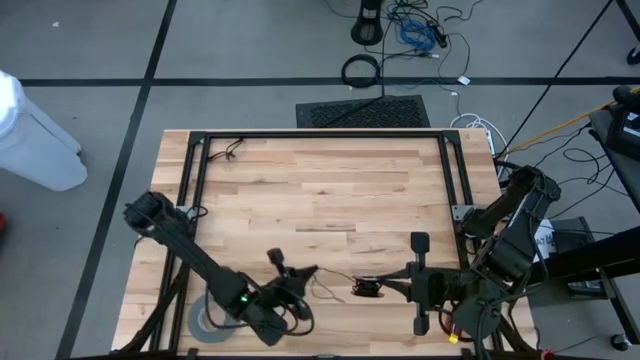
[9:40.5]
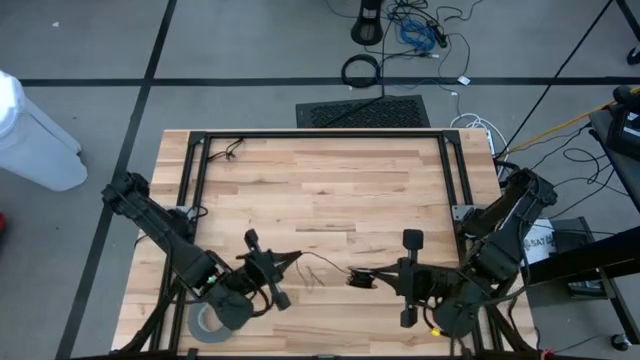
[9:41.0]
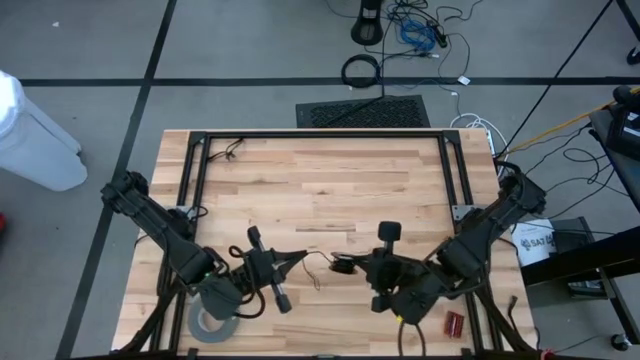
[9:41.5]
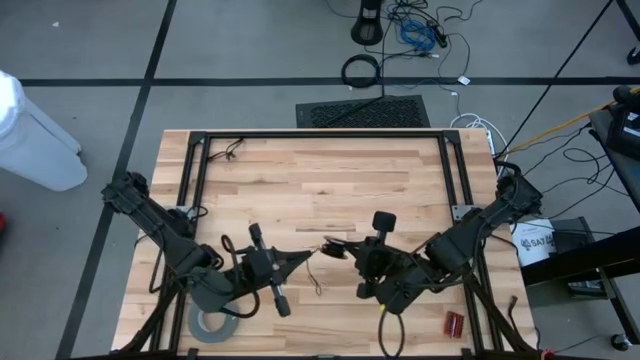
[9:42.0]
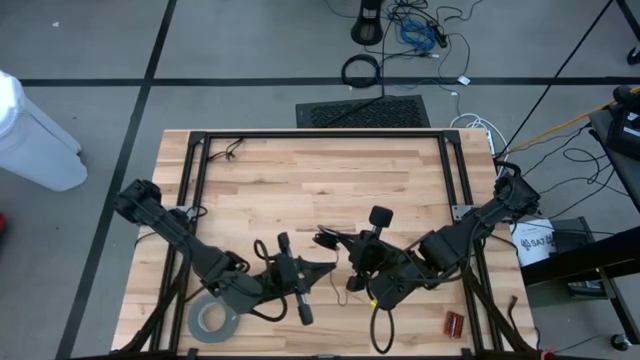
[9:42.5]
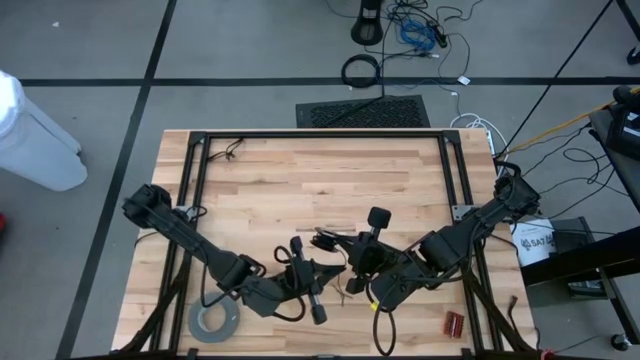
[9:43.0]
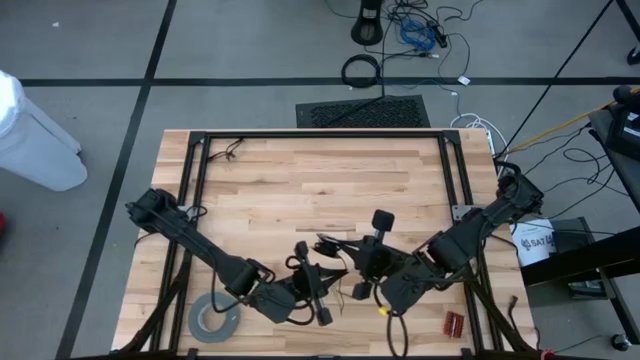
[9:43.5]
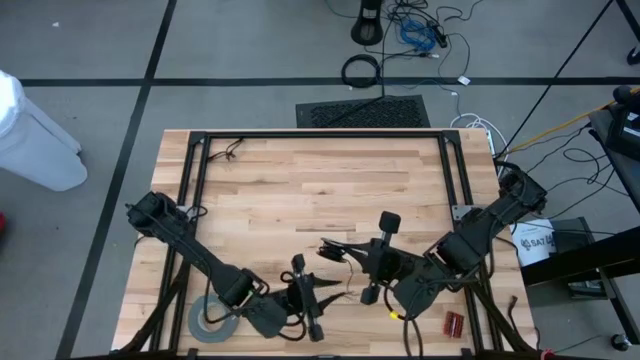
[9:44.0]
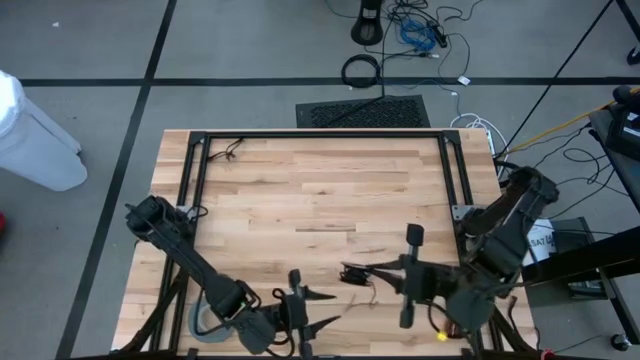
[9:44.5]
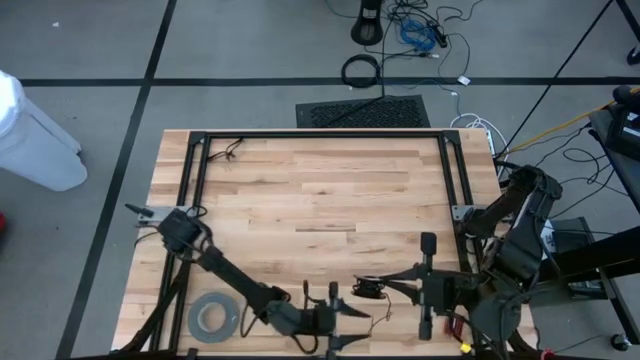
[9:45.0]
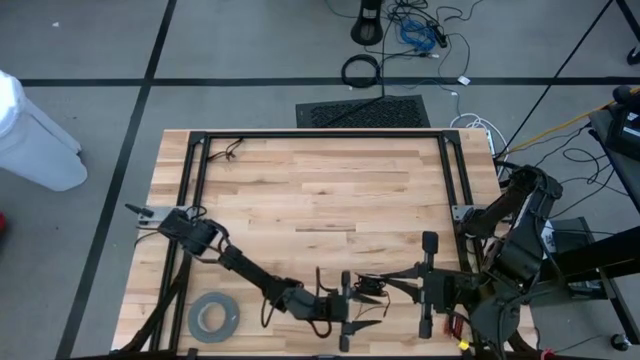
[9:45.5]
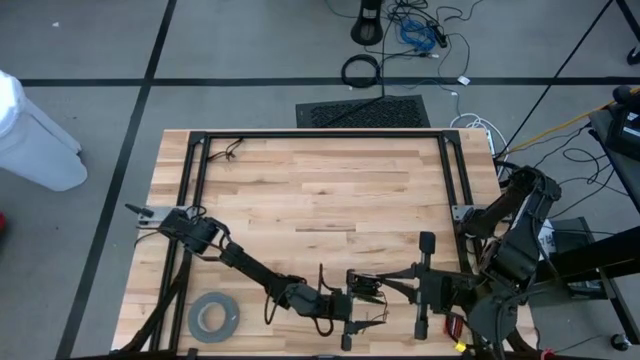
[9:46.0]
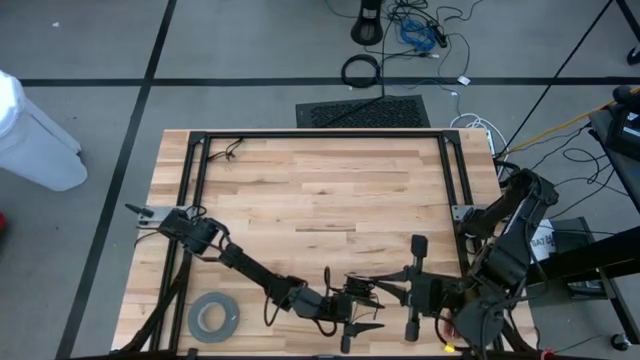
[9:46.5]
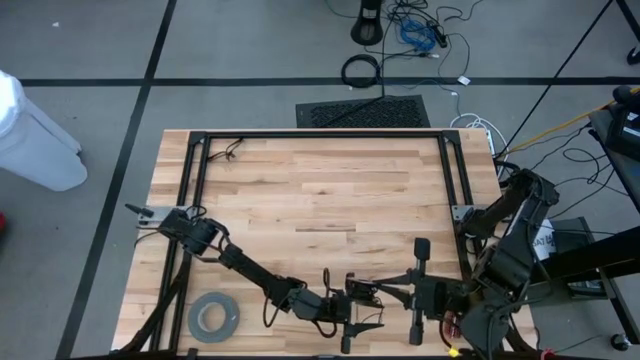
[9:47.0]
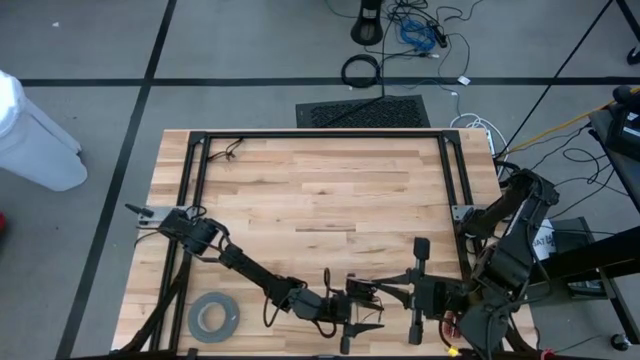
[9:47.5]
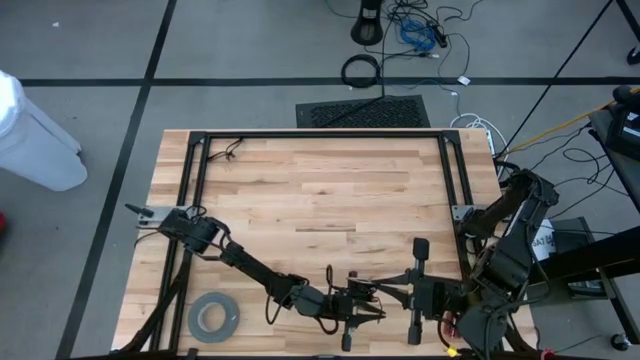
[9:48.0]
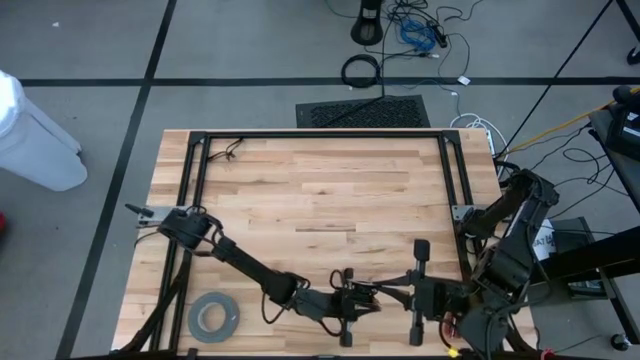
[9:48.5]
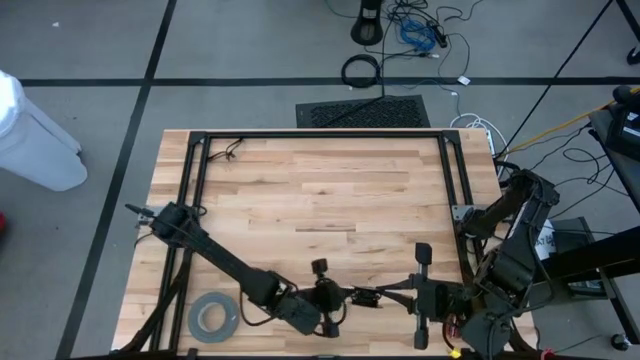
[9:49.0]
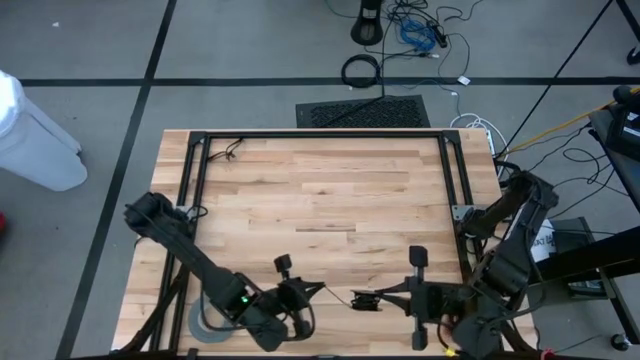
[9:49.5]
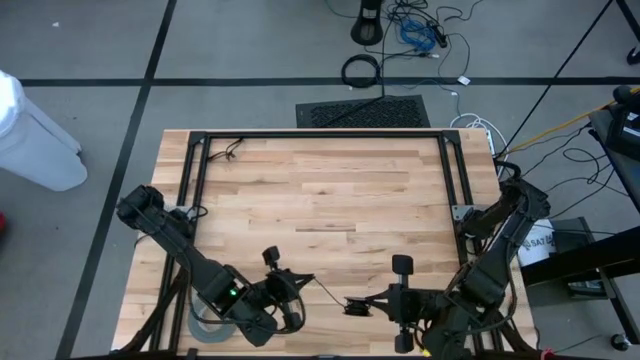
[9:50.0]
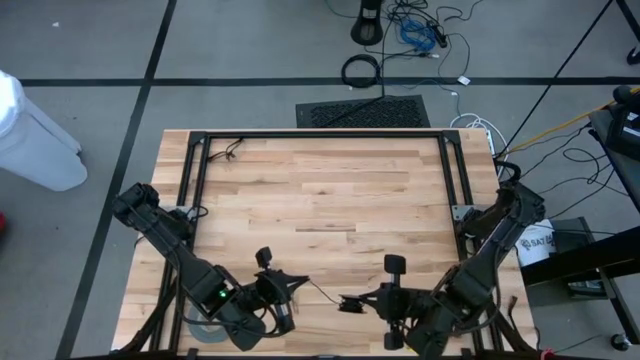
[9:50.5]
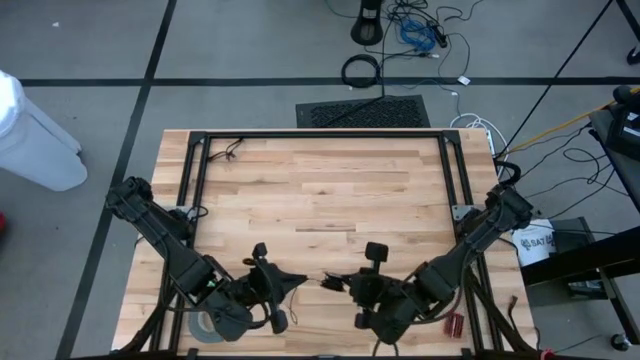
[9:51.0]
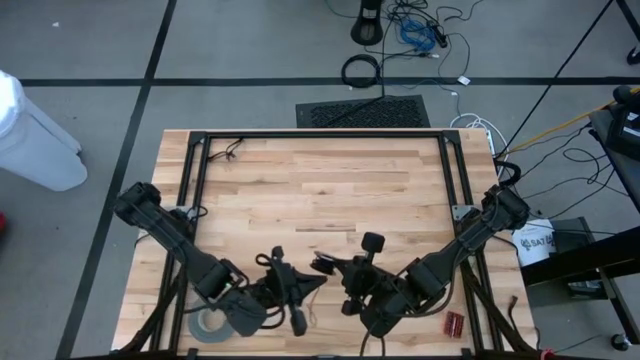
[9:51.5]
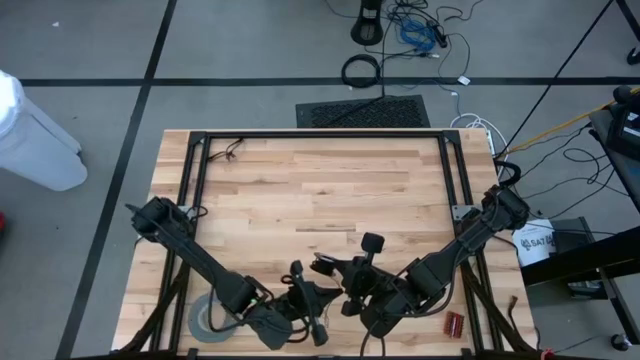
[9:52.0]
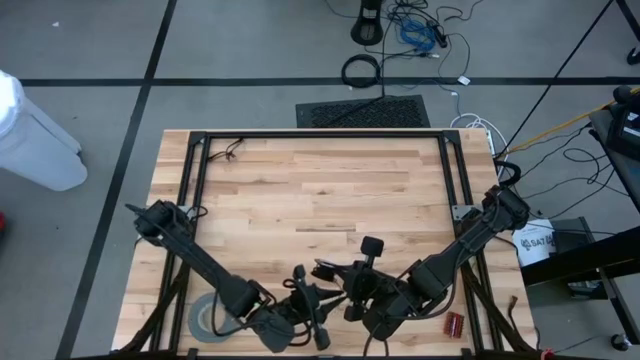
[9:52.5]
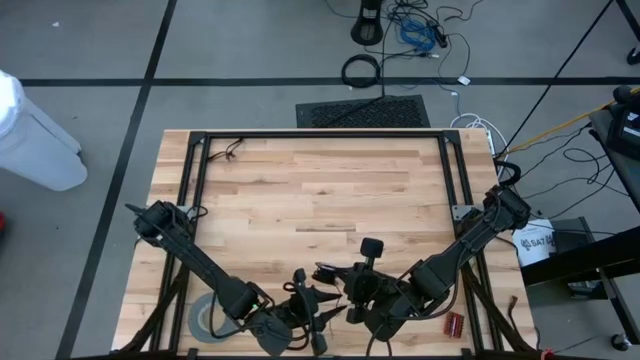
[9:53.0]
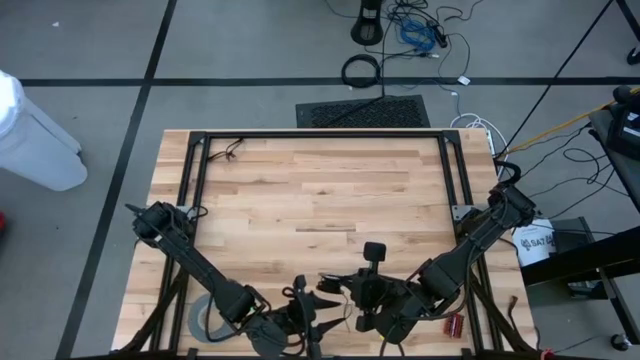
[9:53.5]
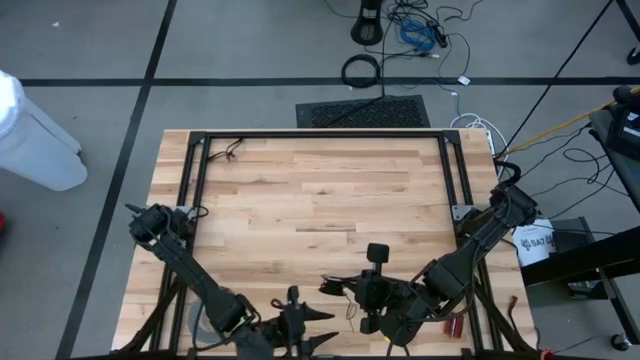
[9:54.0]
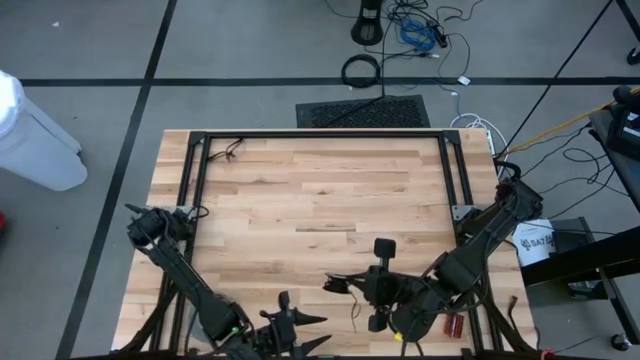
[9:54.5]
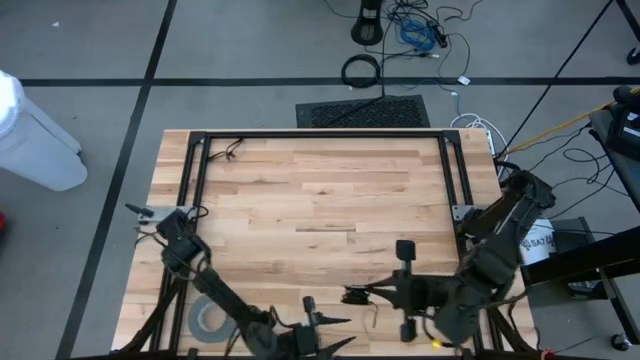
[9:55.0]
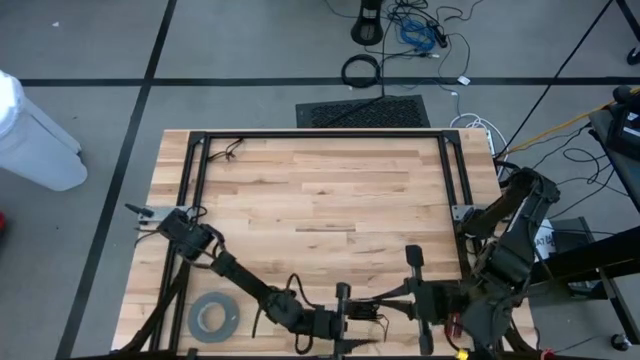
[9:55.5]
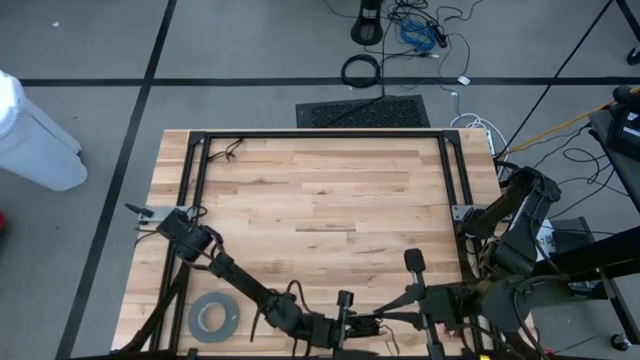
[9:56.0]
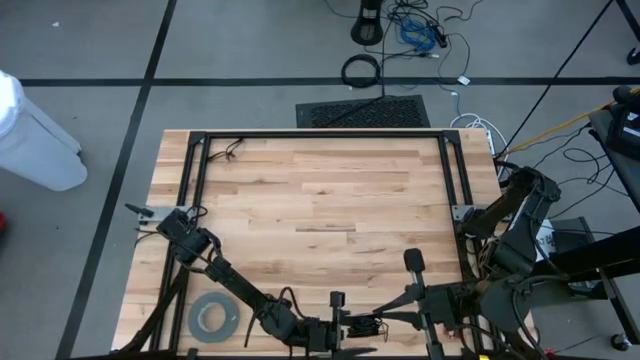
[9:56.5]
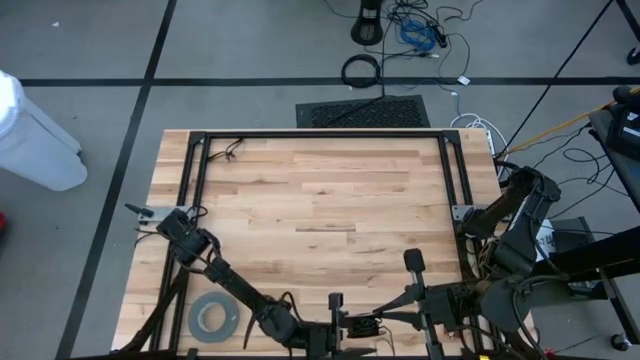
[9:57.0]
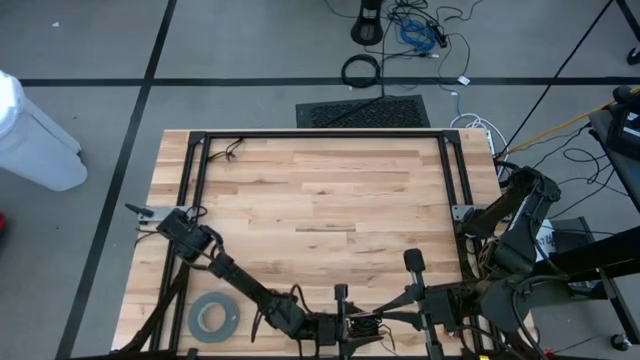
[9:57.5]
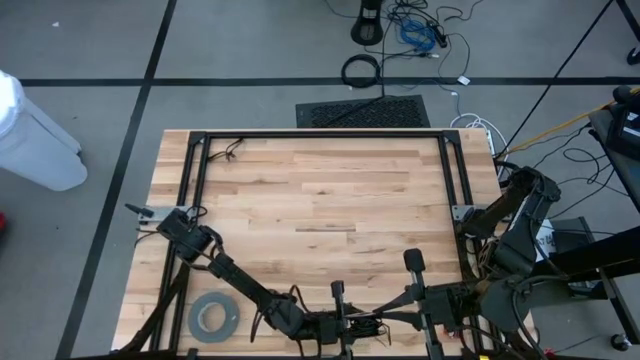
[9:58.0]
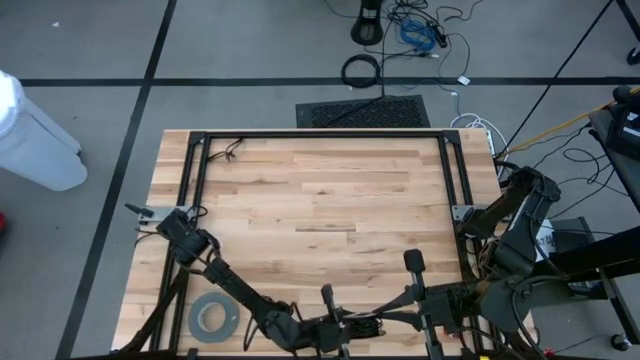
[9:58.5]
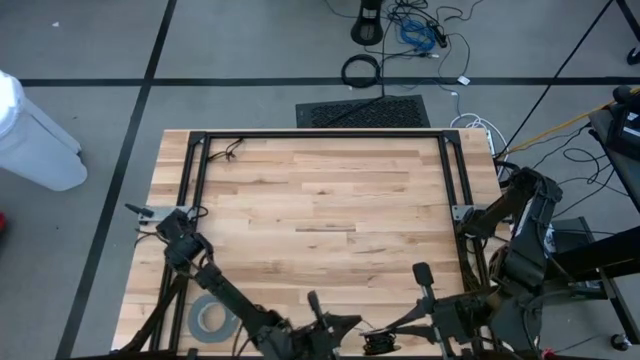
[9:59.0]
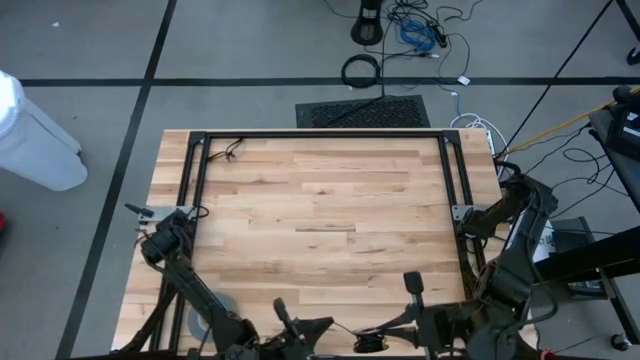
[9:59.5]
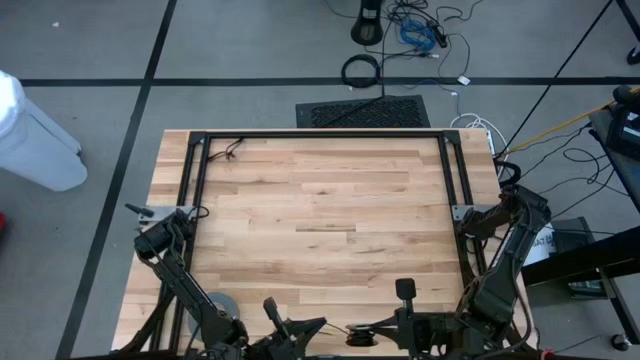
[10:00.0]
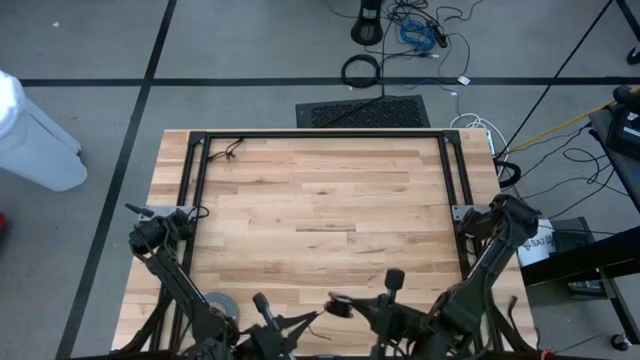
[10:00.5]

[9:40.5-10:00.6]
Task: Coil cords
Coil the black wire onto the spool
